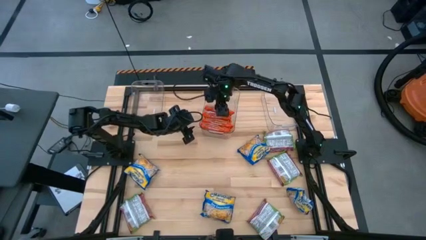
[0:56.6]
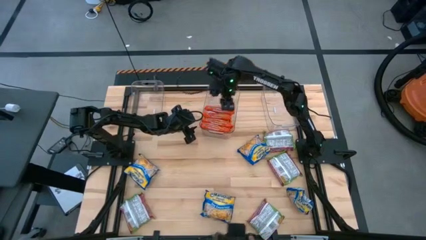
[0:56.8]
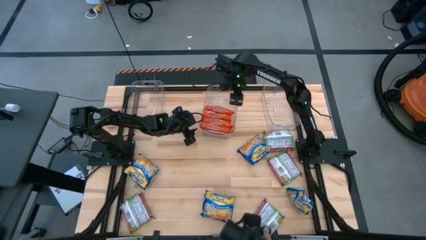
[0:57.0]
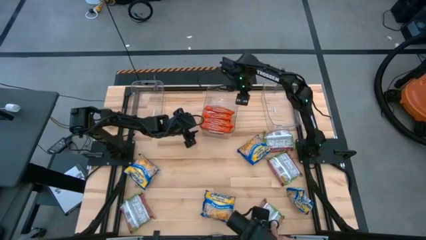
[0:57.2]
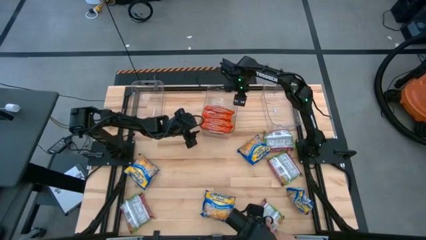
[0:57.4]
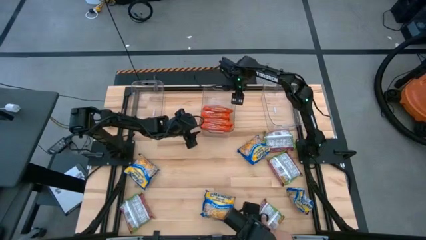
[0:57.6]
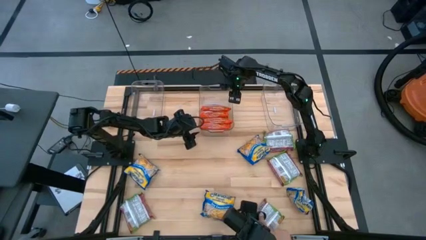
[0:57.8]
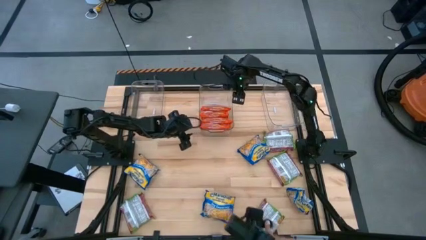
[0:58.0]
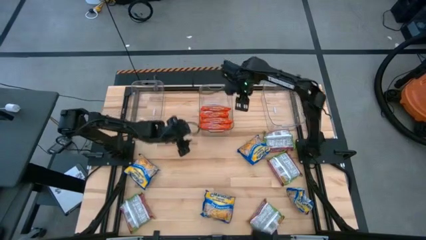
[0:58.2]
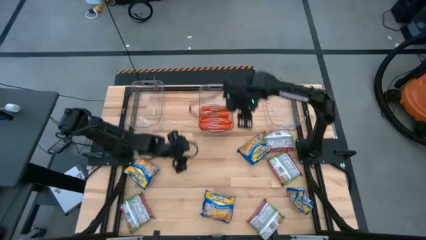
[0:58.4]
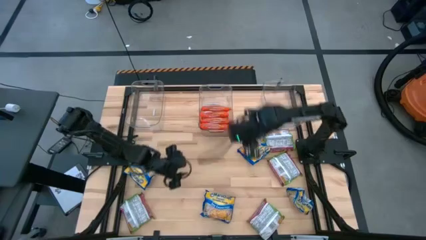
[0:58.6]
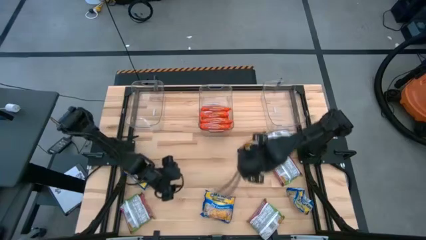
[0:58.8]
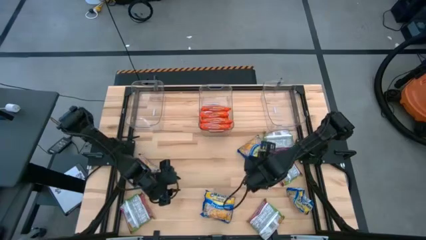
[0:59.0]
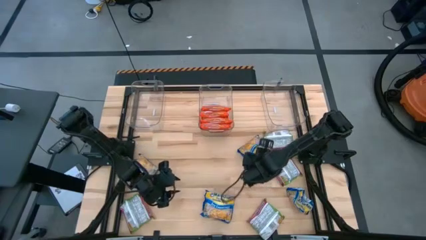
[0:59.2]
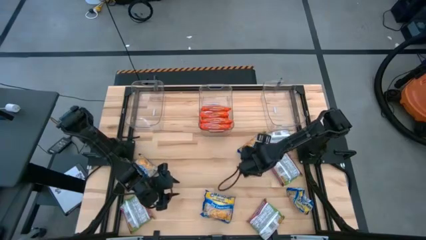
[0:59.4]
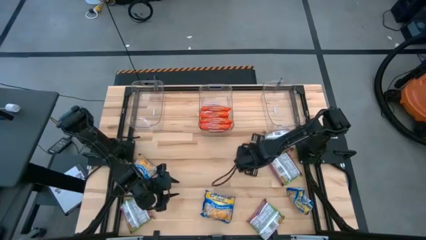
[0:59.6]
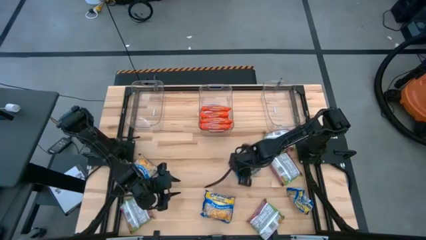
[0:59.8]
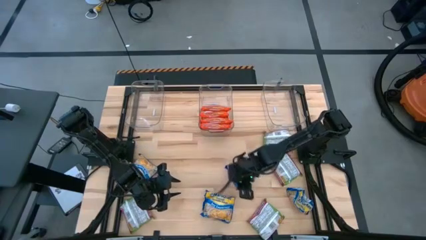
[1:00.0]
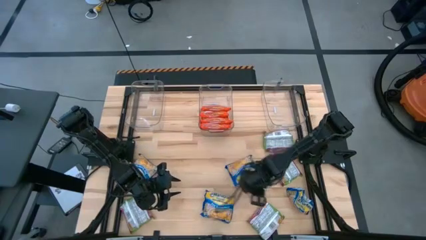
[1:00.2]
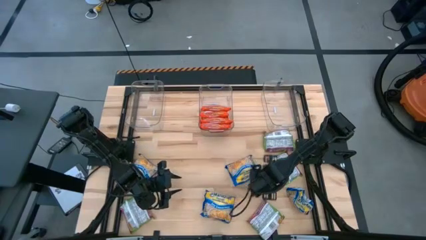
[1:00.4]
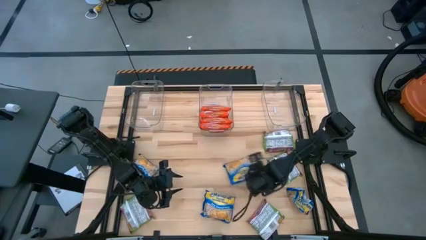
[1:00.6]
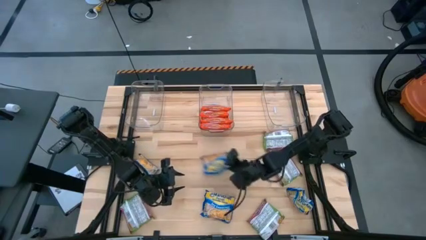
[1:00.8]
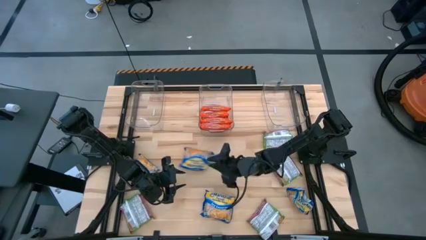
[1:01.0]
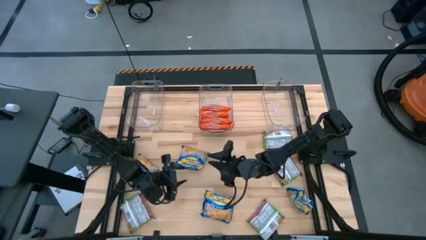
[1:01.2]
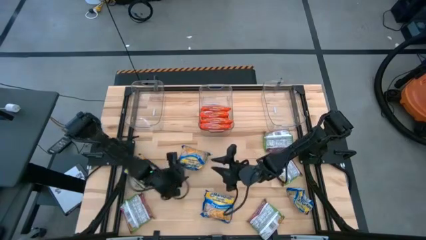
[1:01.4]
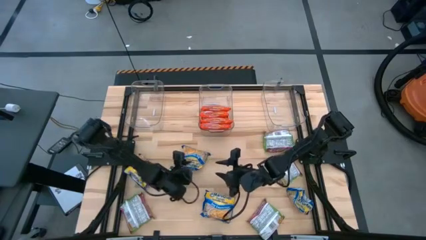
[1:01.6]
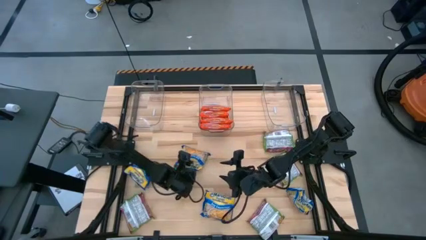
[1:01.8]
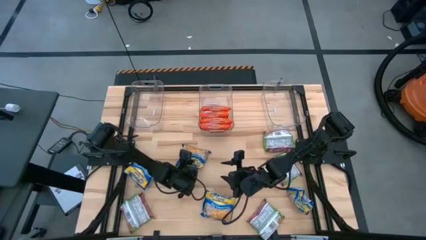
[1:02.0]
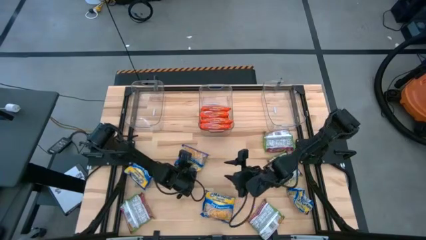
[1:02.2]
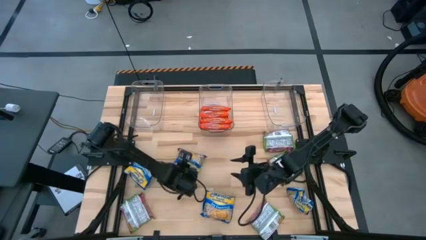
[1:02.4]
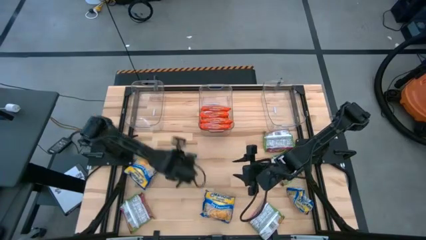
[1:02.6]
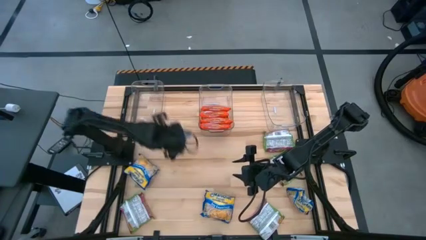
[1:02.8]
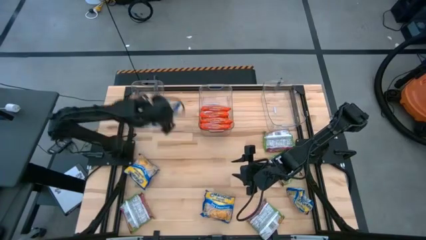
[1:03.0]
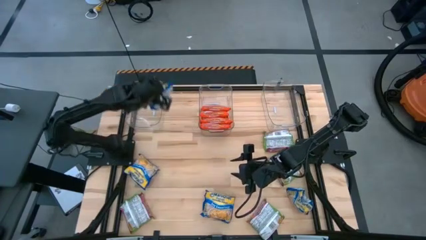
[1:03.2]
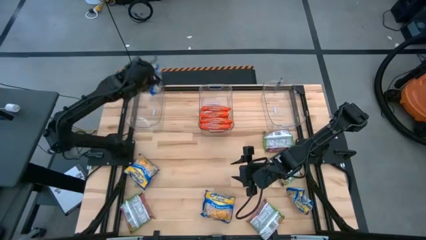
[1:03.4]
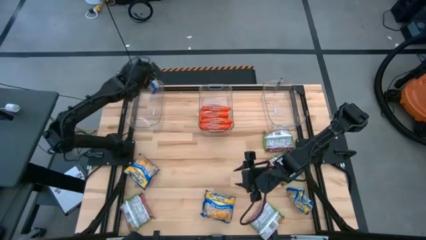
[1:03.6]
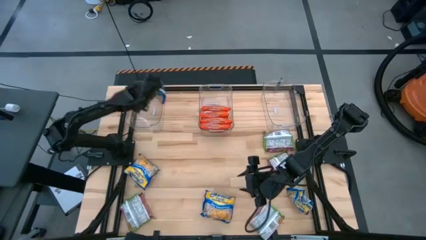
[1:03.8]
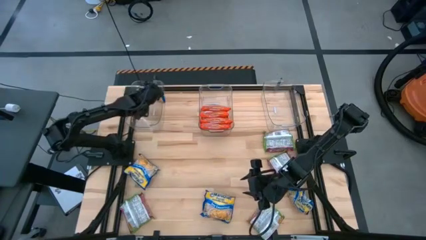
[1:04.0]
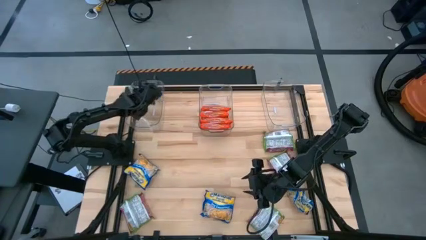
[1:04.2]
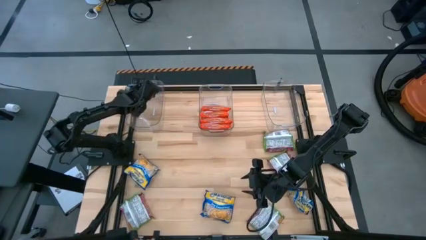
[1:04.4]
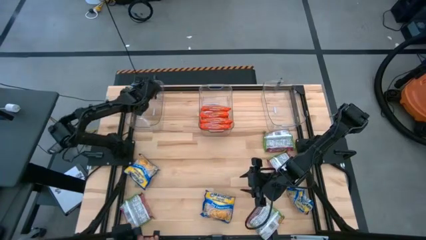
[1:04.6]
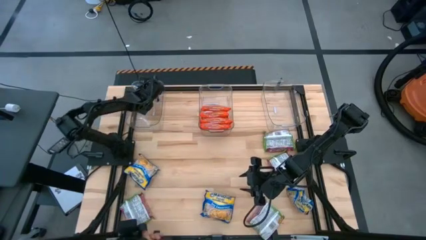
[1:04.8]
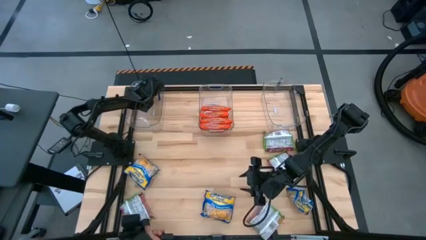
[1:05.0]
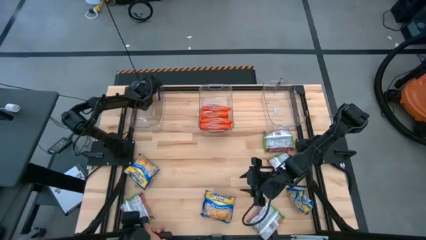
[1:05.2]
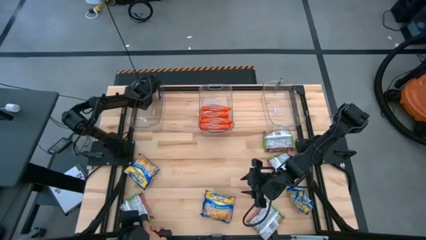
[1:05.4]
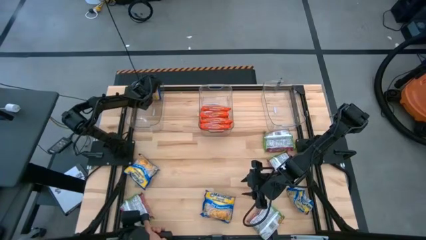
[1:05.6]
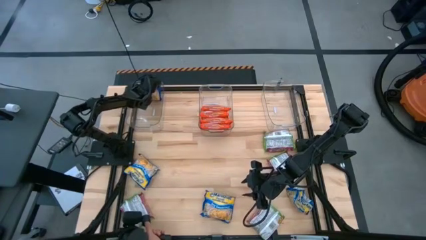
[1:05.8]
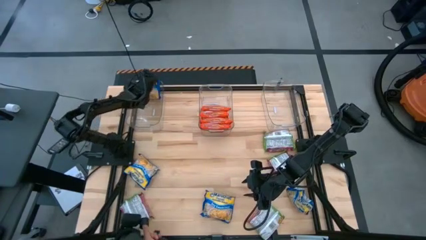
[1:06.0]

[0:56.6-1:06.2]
Task: Sort Maruchan noodles
Put the blue noodle pack into the left transparent bin

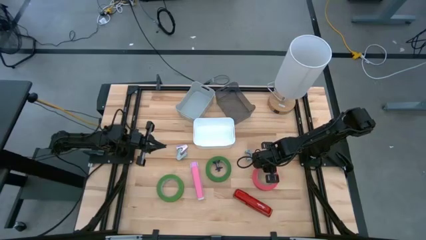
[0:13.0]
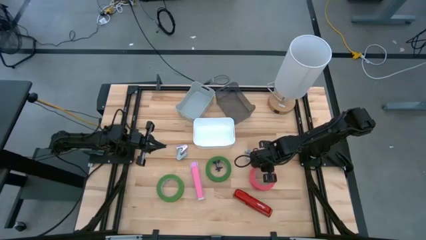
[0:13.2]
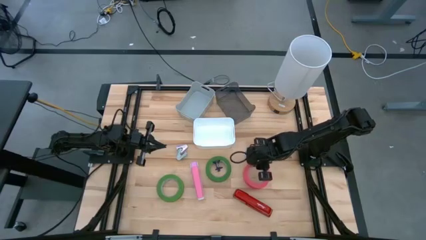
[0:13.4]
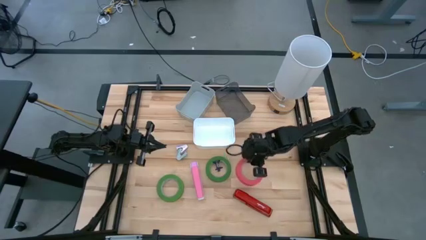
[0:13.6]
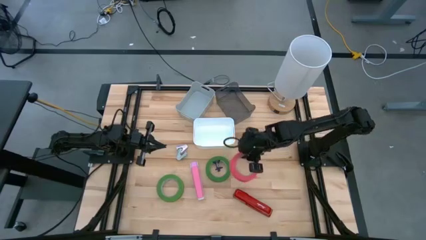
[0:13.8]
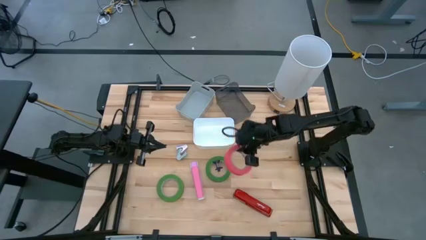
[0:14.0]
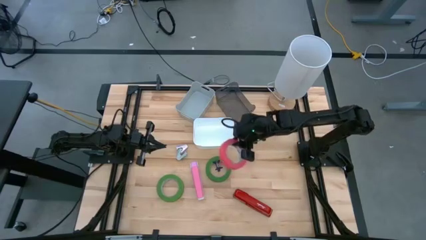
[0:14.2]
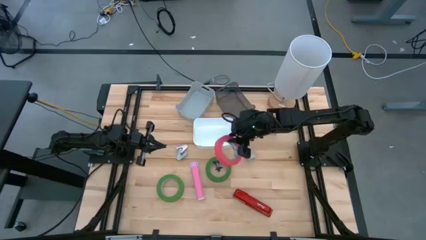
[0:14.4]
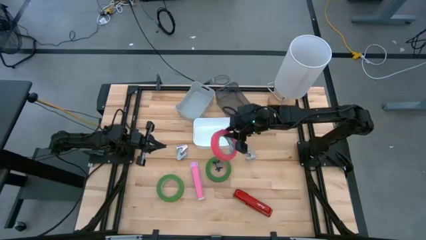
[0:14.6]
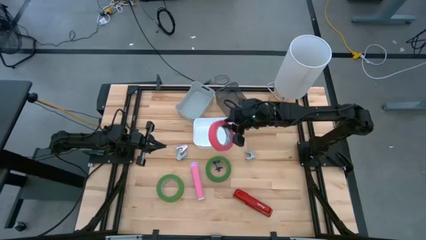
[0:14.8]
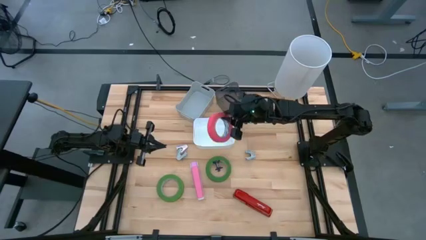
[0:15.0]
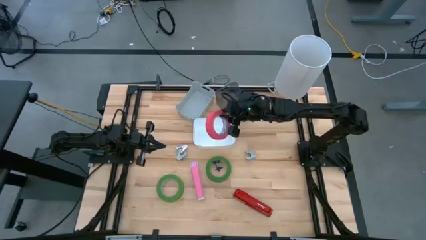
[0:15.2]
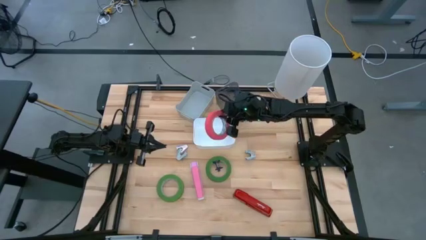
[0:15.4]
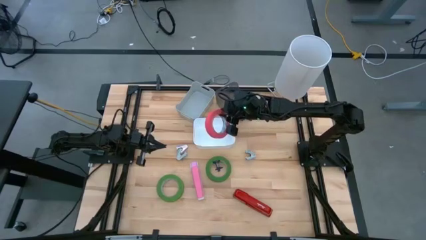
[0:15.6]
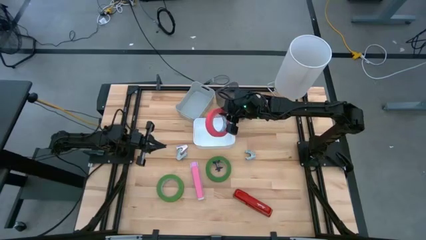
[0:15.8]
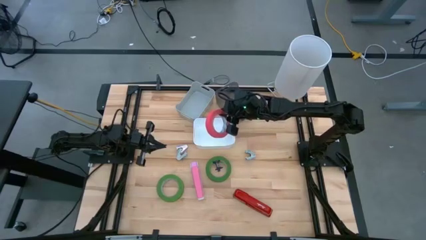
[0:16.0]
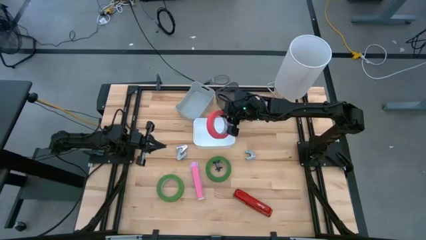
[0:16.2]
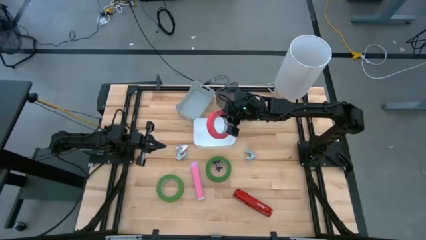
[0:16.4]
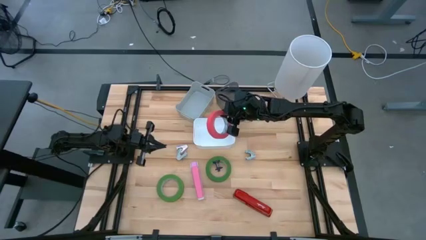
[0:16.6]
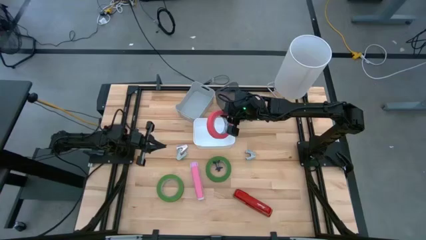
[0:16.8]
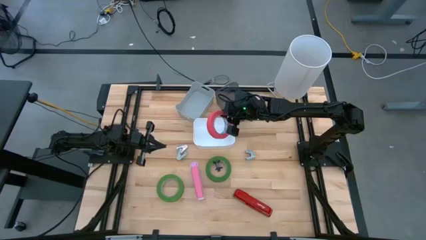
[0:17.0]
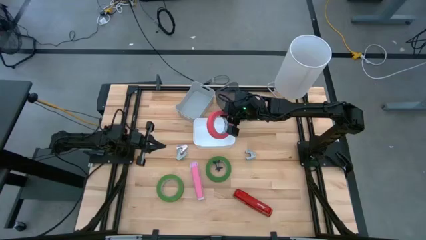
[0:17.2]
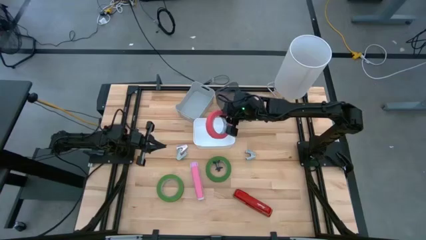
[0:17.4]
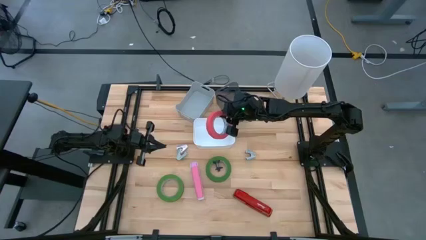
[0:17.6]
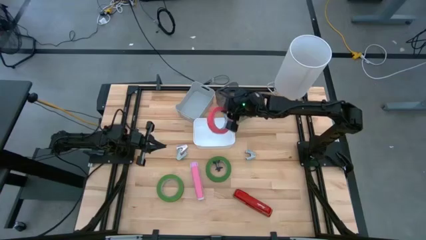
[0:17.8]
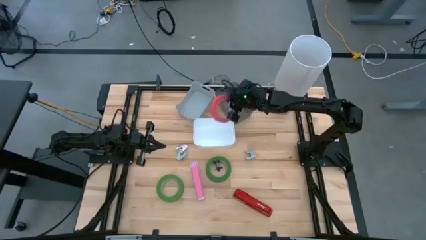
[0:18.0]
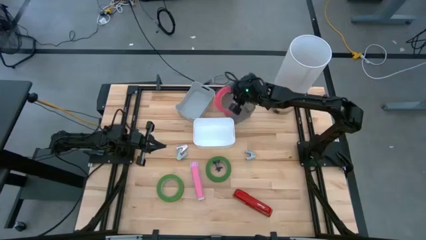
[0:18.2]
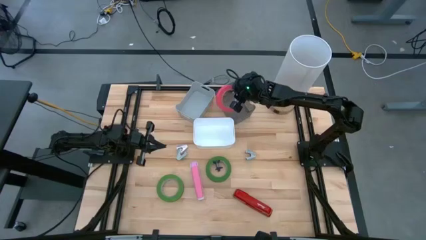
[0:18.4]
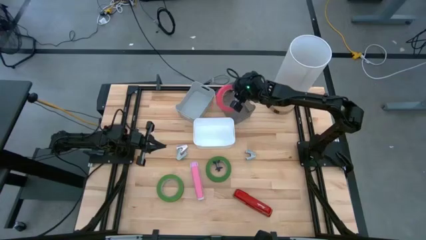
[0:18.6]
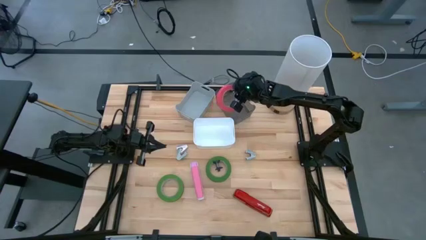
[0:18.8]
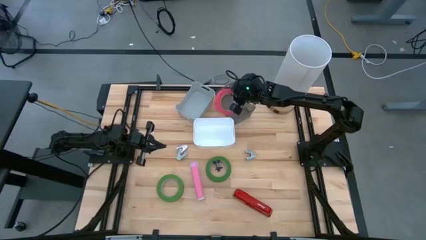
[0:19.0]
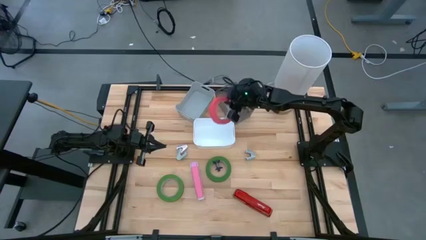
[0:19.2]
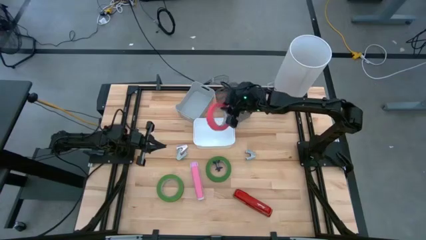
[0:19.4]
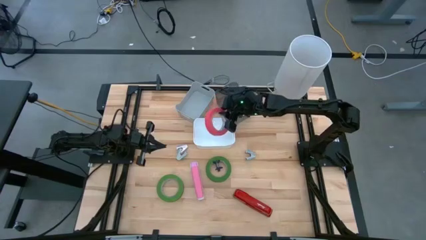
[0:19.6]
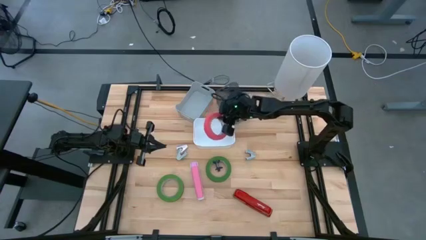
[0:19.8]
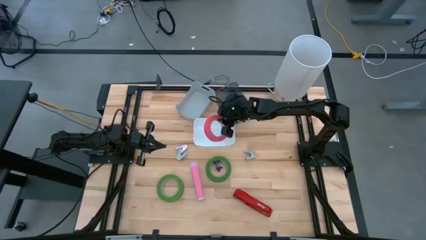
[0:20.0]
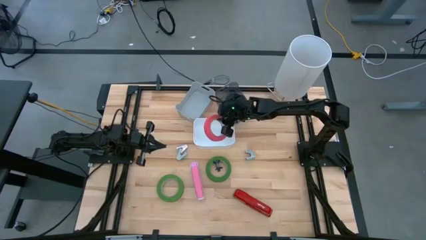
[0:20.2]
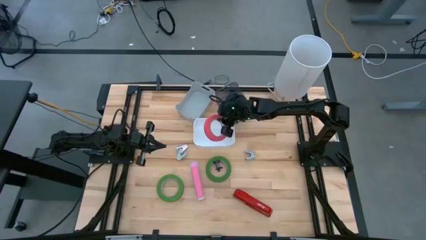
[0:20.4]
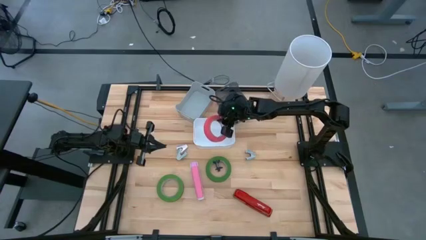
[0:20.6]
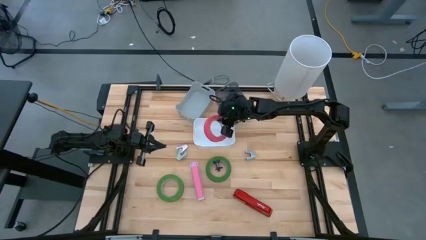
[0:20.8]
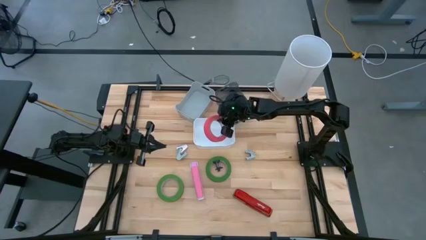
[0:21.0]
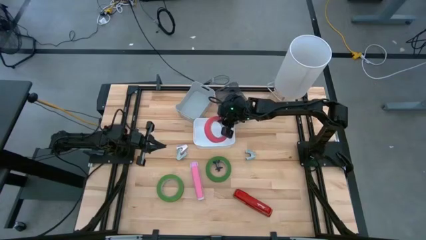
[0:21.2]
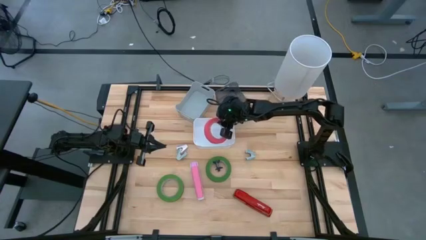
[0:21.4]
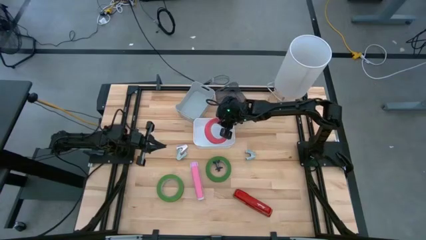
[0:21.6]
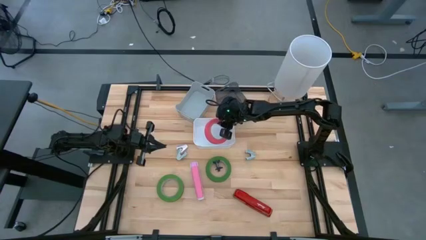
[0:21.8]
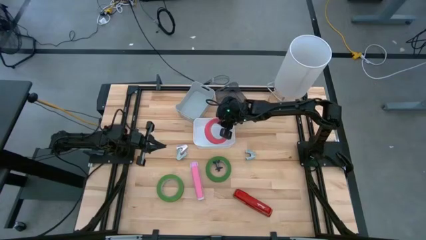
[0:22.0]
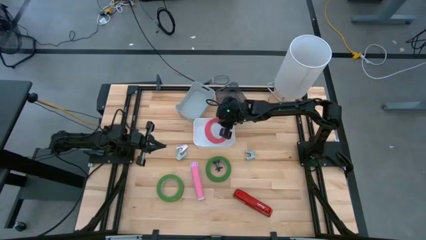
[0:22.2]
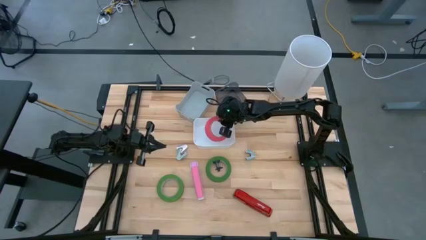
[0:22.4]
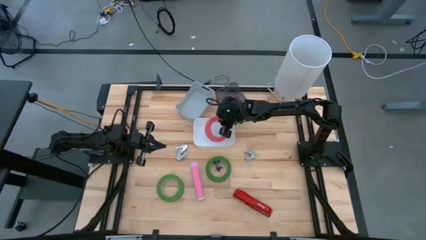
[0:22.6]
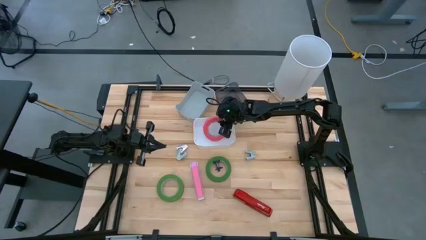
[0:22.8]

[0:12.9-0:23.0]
Task: Pick and place Stapler, Stapler remover, tape
Put the pink tape into the white bin
